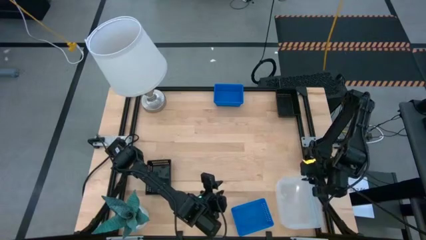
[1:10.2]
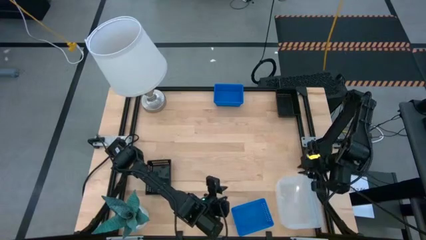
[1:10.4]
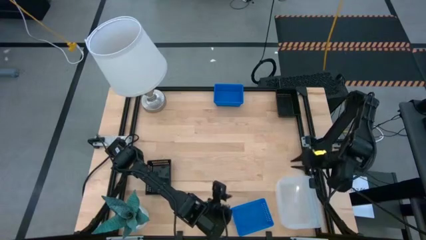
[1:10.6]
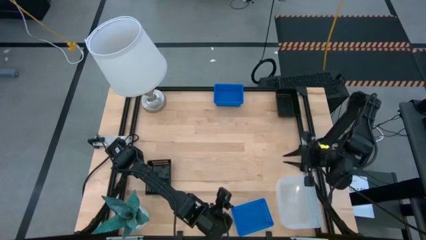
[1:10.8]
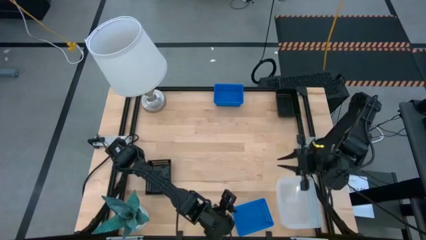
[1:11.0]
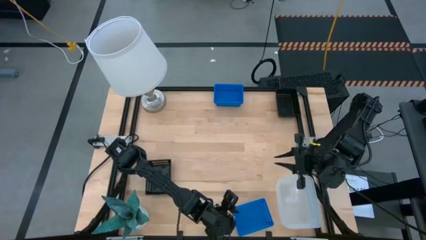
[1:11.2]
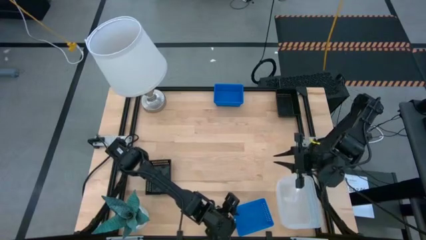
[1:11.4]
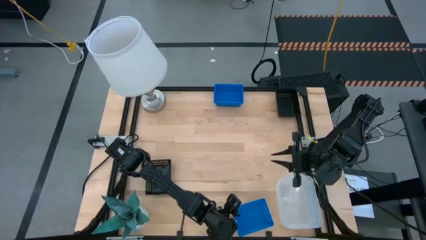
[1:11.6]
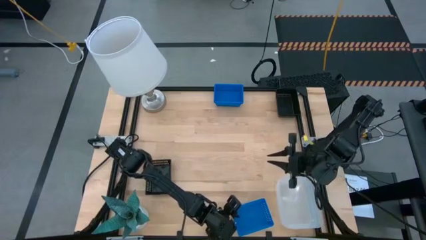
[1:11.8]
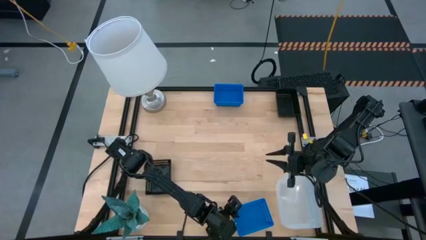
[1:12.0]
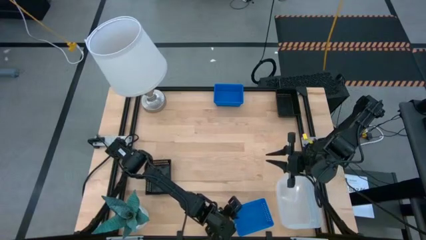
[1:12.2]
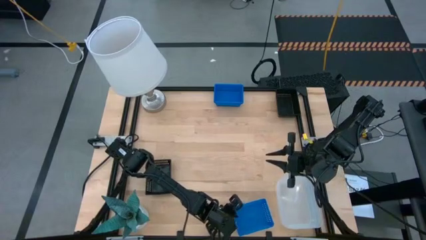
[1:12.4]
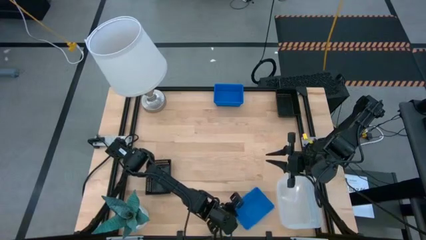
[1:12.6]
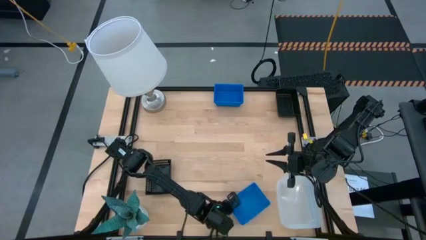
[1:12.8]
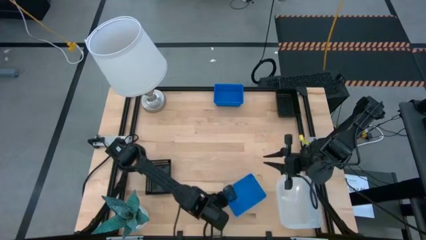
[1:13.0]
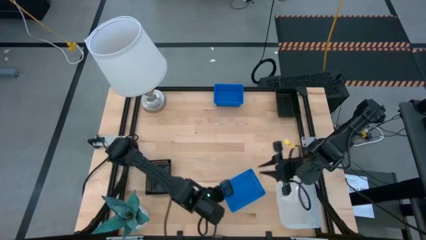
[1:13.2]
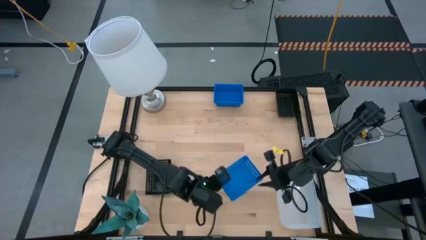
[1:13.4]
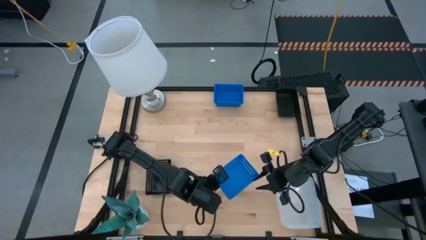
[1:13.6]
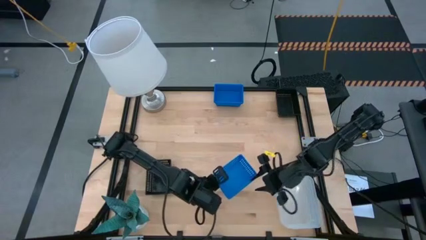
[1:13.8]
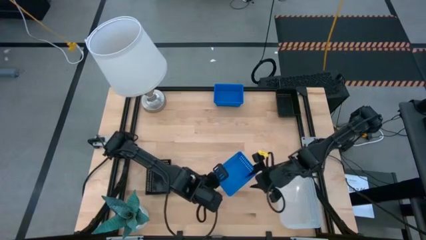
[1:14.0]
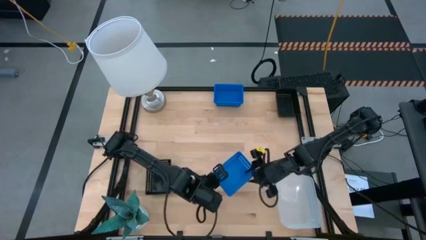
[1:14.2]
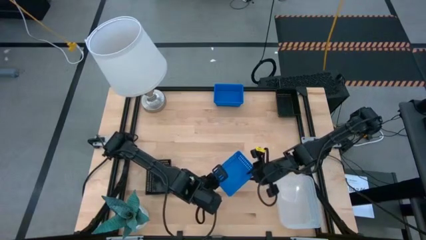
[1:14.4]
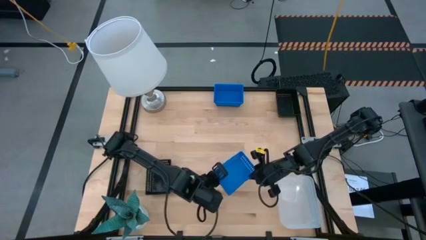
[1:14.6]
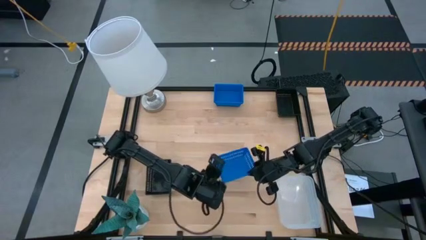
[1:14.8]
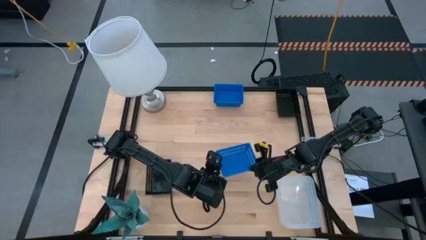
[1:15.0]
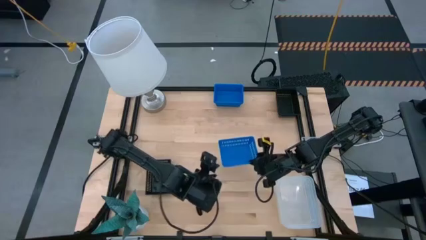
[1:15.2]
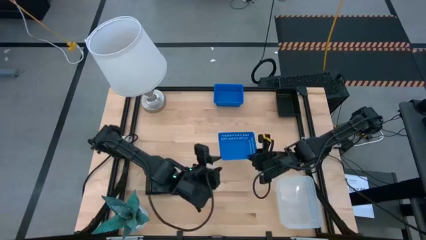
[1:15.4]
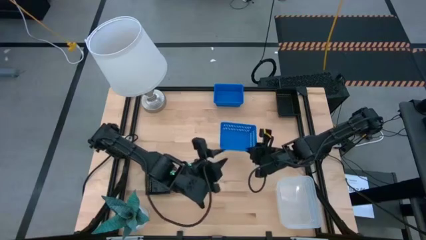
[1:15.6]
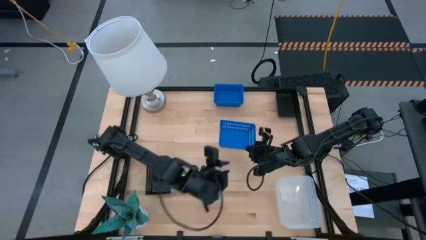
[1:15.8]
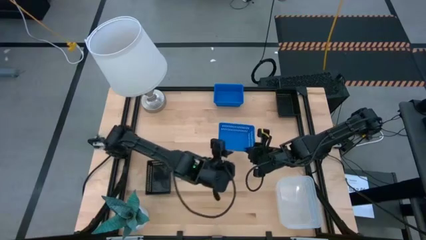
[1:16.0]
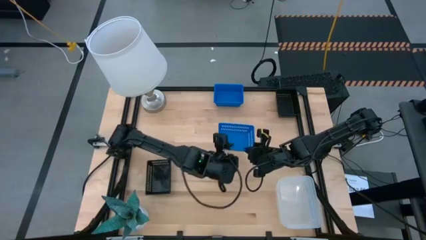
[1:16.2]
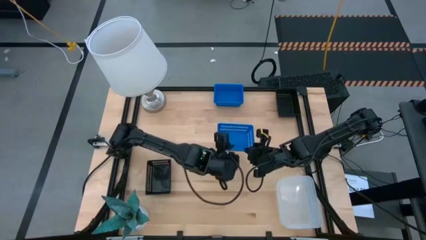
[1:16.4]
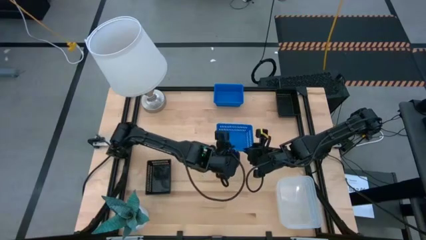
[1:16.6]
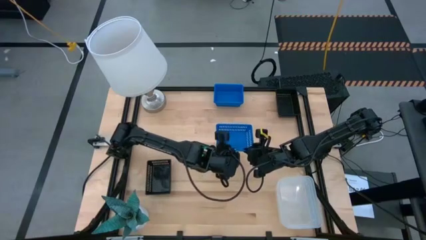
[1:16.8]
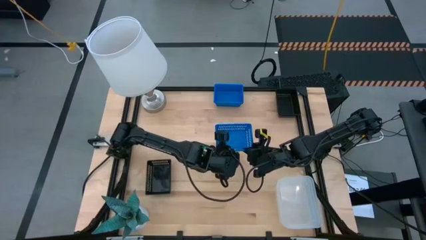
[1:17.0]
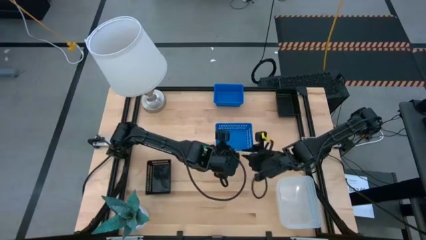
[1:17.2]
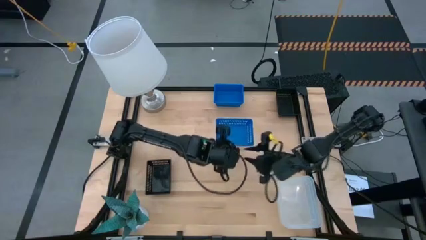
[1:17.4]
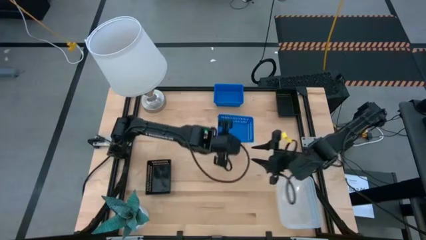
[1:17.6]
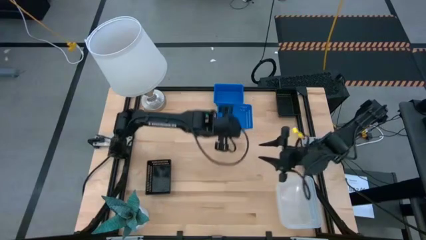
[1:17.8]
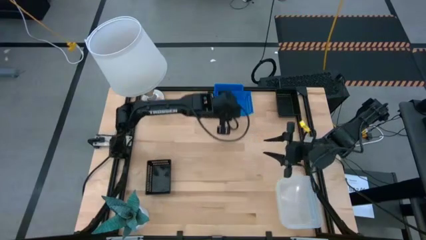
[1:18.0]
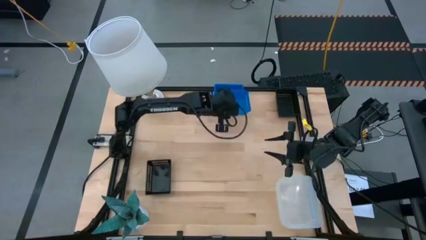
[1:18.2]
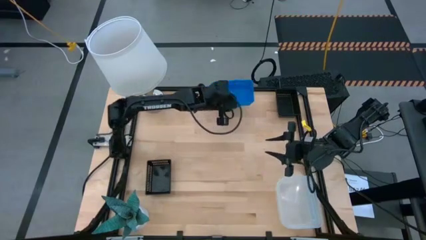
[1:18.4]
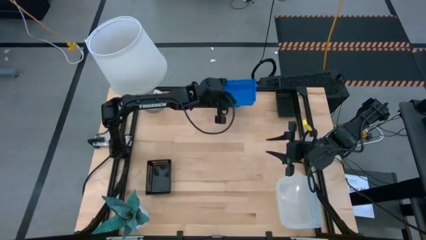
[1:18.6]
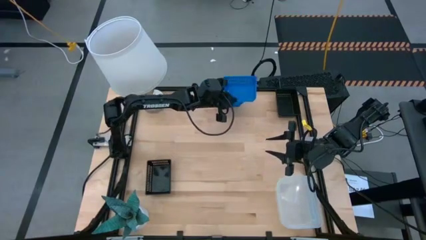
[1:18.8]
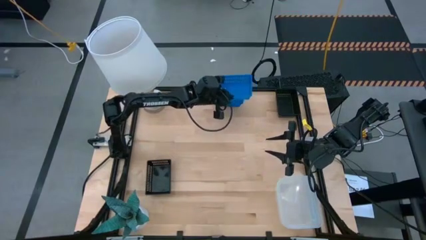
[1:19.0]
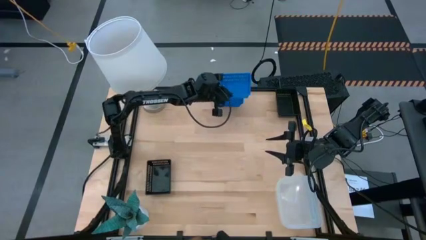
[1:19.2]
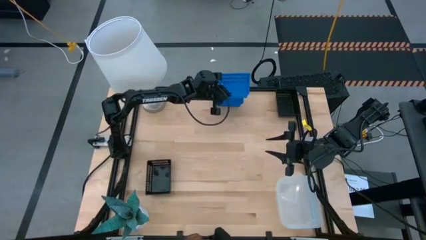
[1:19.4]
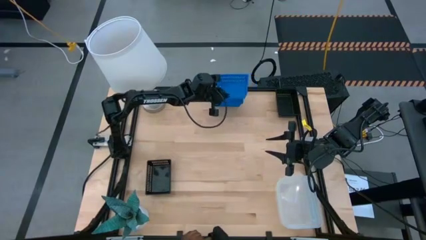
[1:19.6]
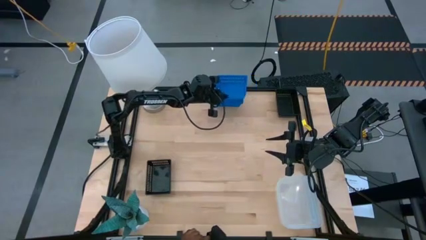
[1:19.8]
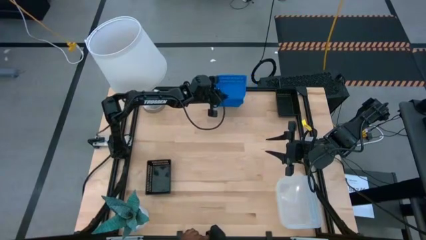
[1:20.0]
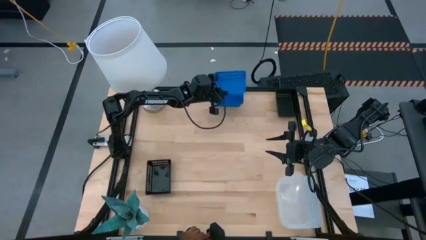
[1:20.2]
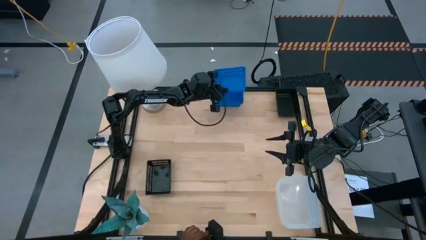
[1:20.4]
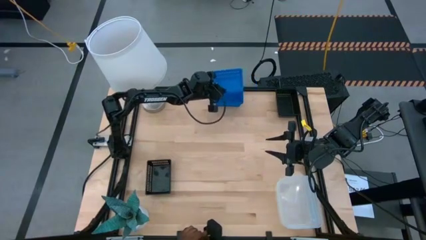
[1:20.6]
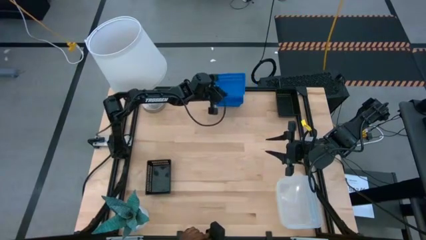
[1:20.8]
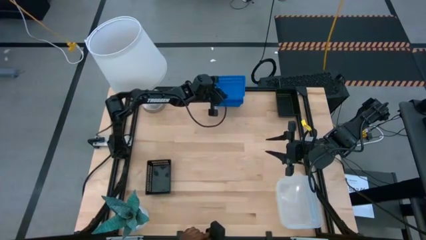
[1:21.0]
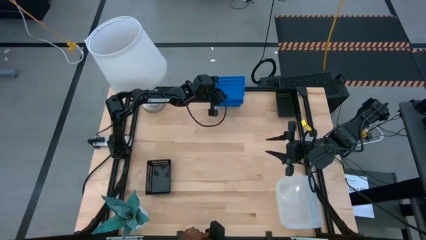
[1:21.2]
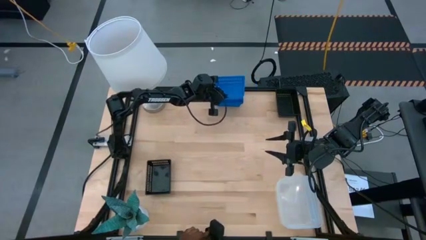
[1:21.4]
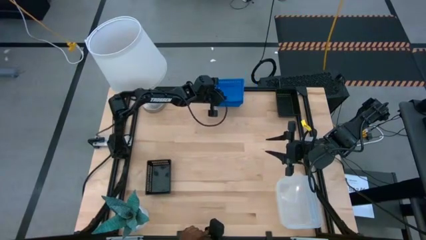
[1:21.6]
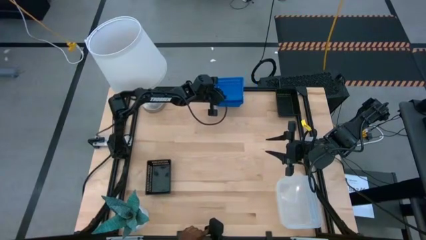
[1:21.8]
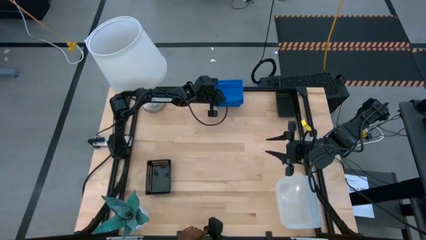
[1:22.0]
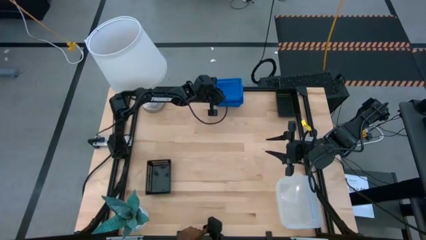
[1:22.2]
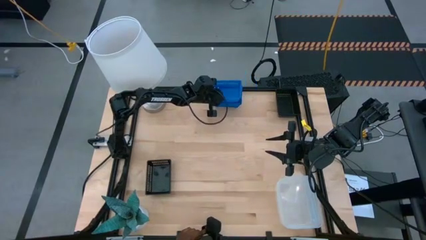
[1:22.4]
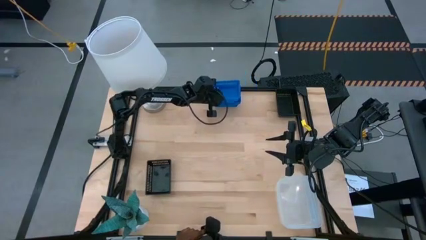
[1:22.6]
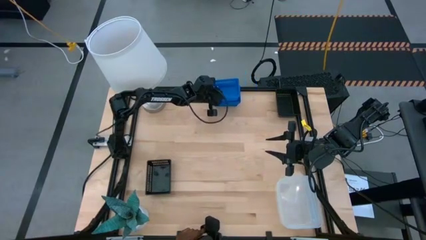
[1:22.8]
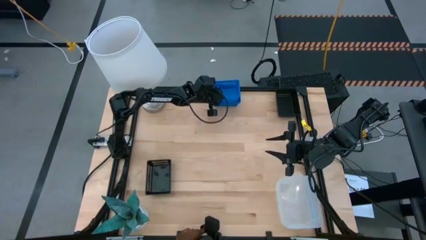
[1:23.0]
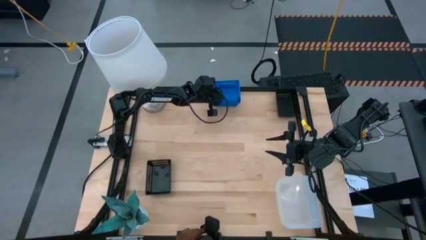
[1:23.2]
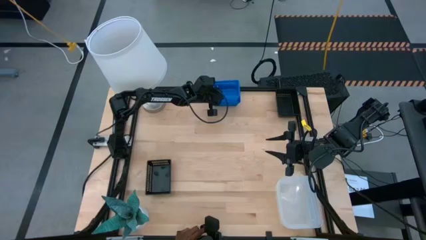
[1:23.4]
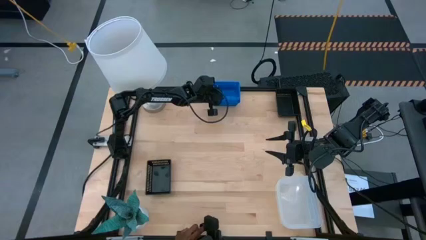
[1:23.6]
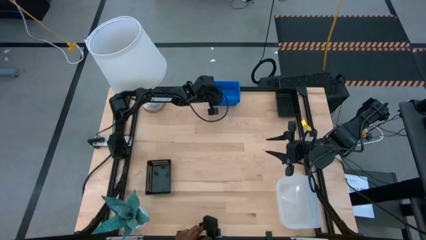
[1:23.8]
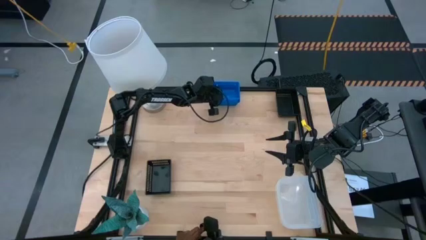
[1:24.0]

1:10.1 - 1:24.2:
Stack the bottom blue bin on top of the top blue bin
